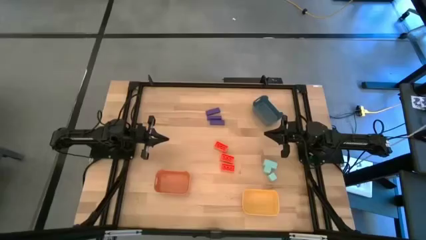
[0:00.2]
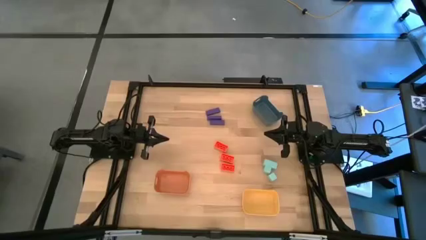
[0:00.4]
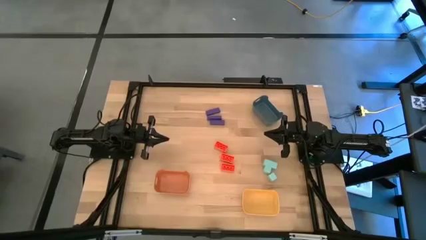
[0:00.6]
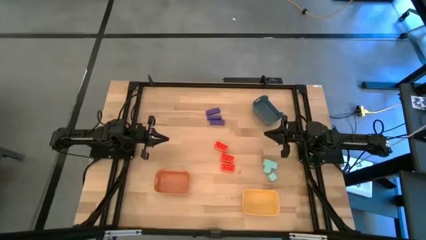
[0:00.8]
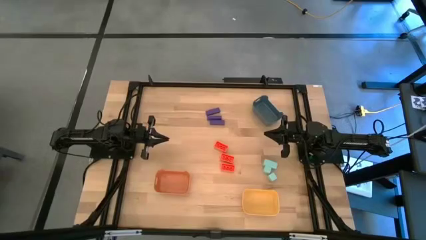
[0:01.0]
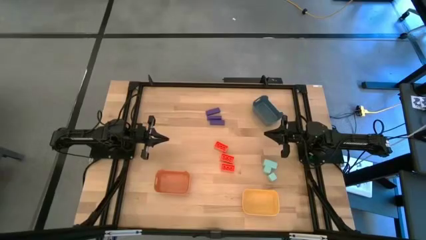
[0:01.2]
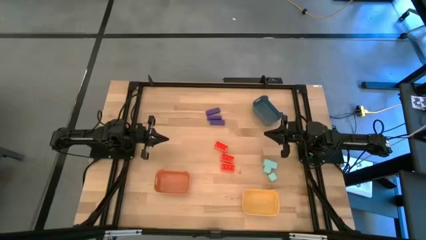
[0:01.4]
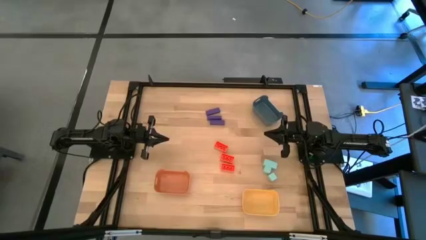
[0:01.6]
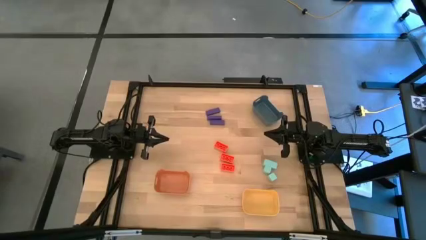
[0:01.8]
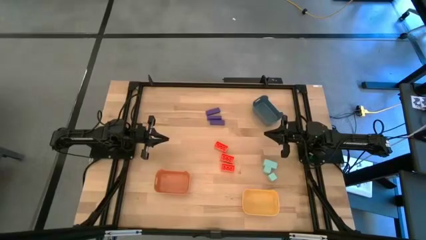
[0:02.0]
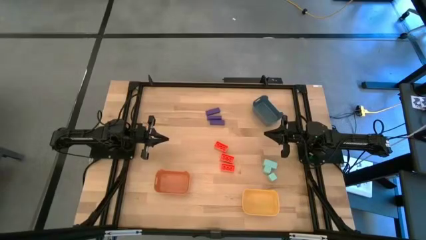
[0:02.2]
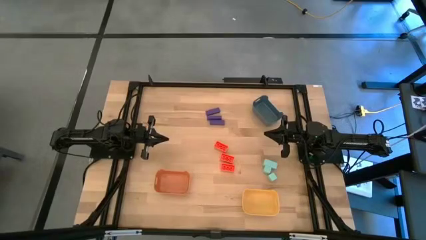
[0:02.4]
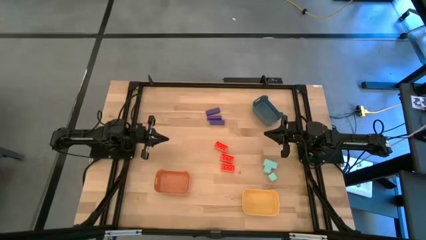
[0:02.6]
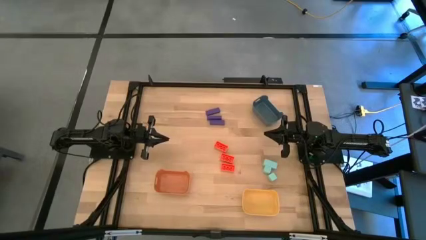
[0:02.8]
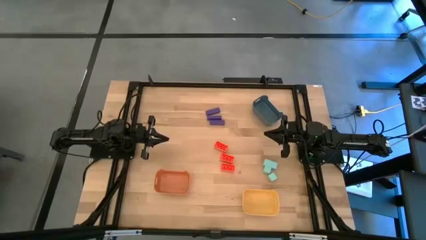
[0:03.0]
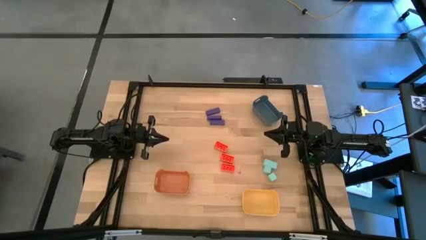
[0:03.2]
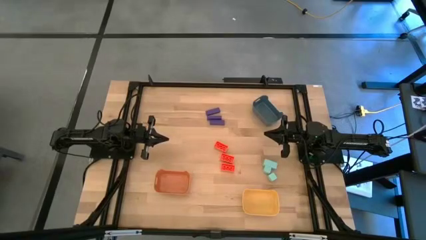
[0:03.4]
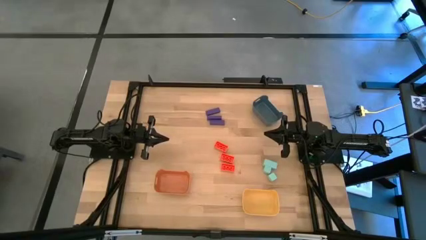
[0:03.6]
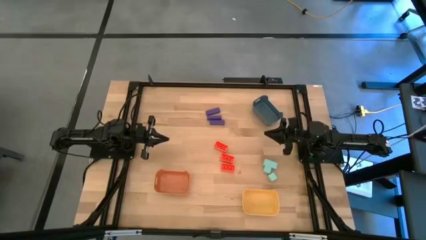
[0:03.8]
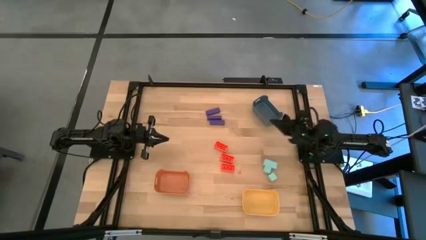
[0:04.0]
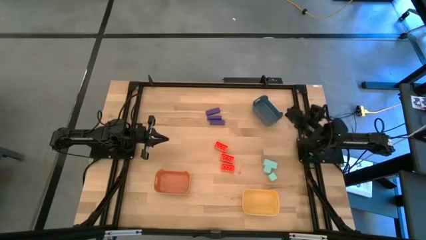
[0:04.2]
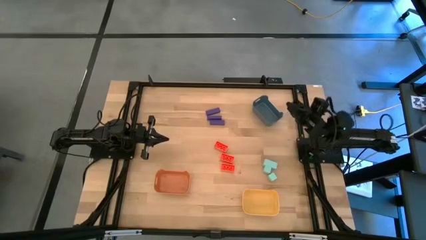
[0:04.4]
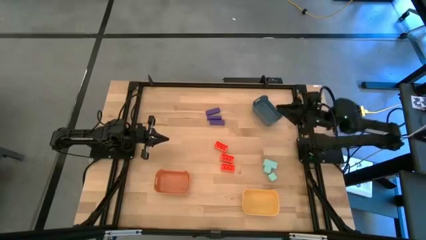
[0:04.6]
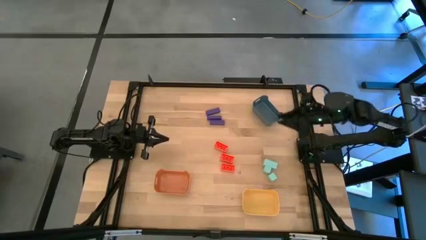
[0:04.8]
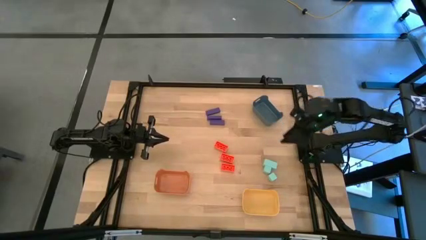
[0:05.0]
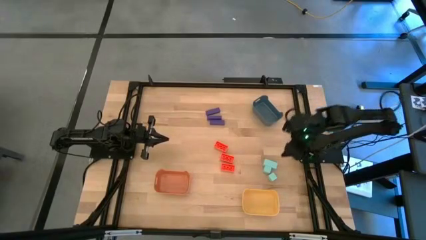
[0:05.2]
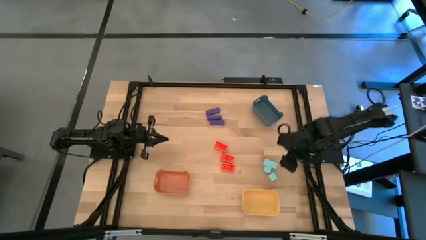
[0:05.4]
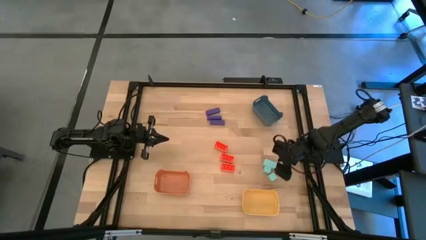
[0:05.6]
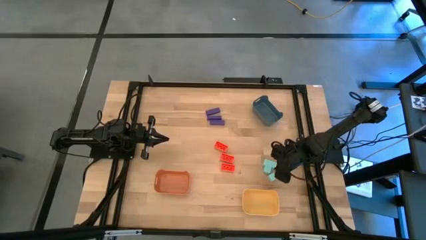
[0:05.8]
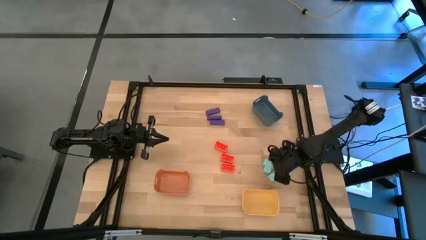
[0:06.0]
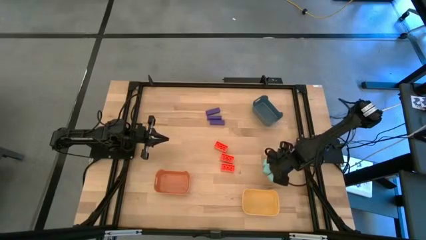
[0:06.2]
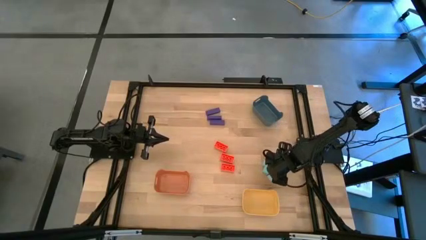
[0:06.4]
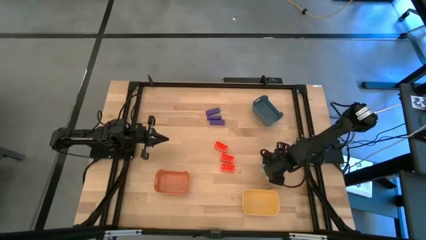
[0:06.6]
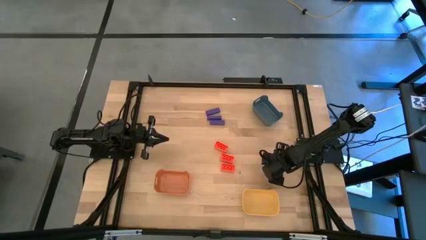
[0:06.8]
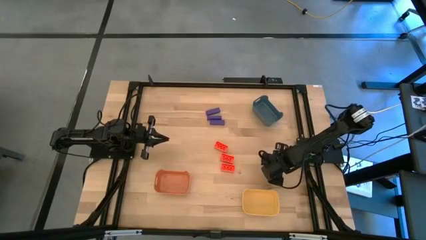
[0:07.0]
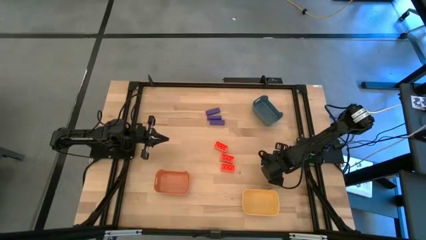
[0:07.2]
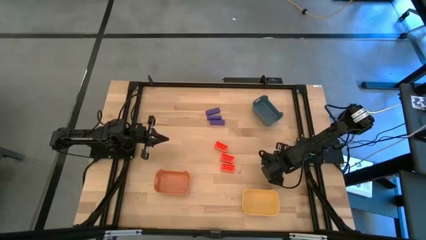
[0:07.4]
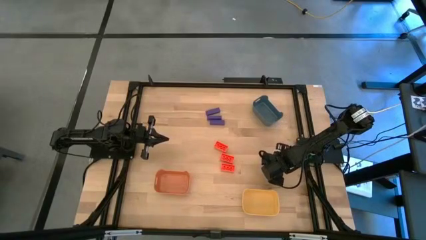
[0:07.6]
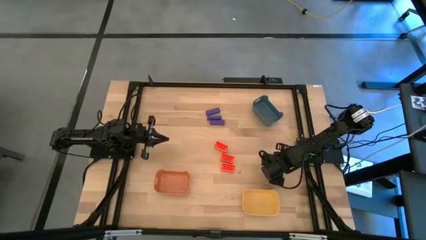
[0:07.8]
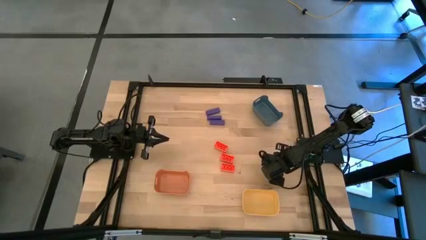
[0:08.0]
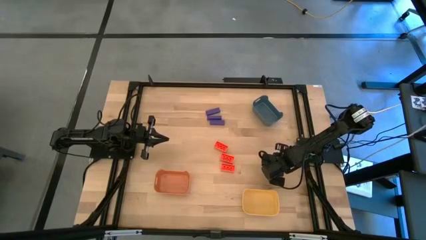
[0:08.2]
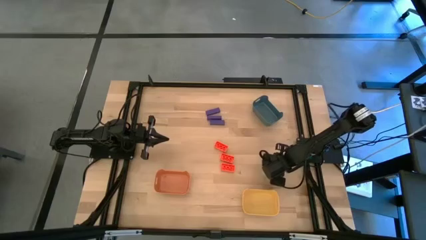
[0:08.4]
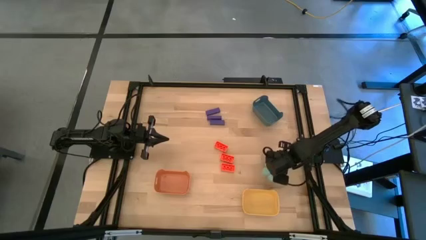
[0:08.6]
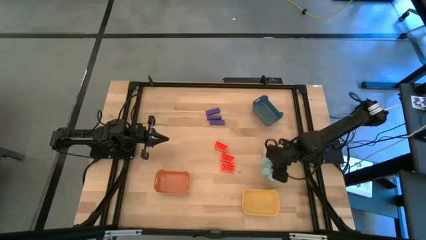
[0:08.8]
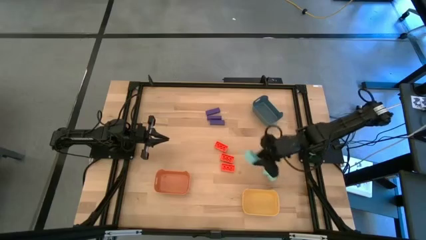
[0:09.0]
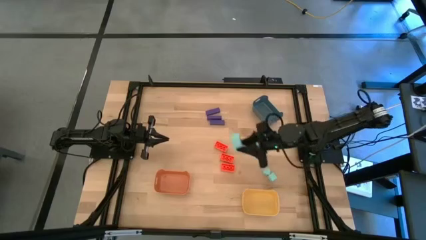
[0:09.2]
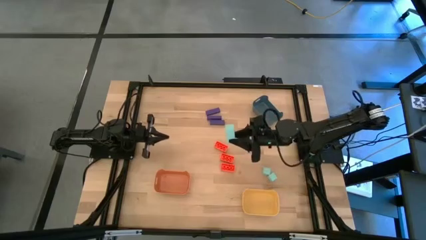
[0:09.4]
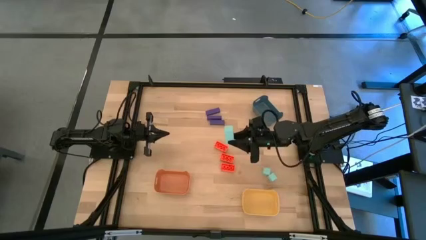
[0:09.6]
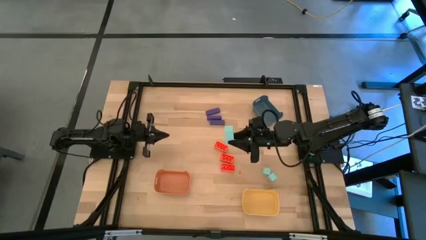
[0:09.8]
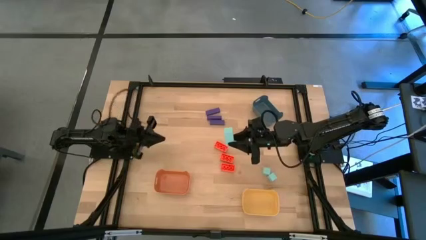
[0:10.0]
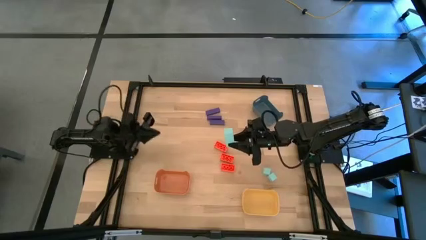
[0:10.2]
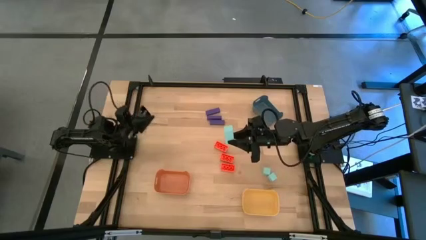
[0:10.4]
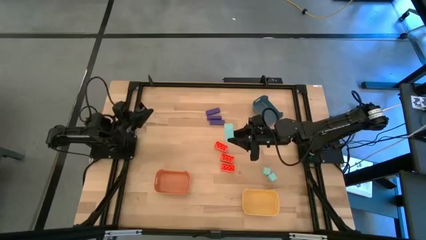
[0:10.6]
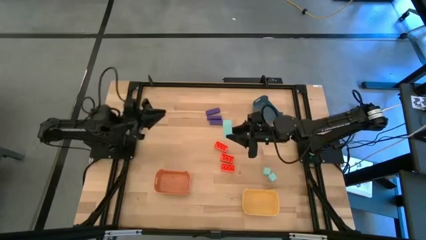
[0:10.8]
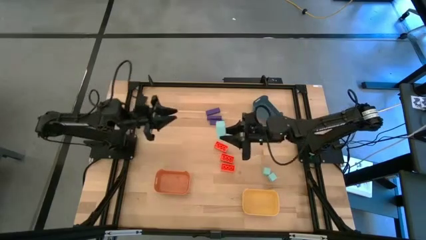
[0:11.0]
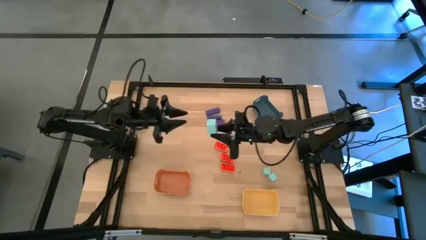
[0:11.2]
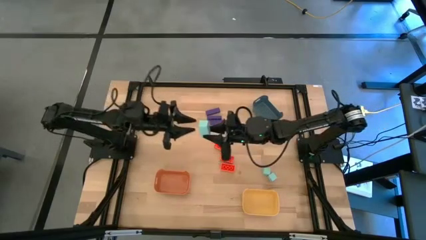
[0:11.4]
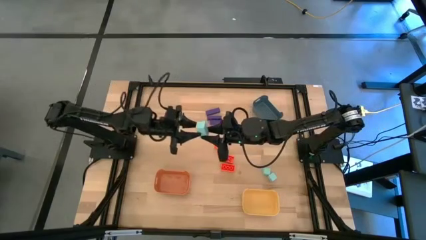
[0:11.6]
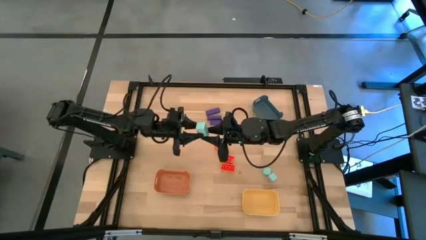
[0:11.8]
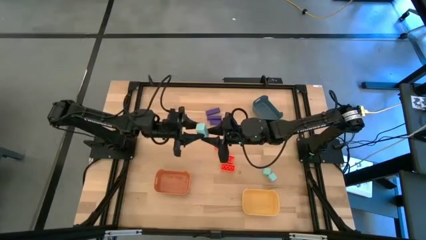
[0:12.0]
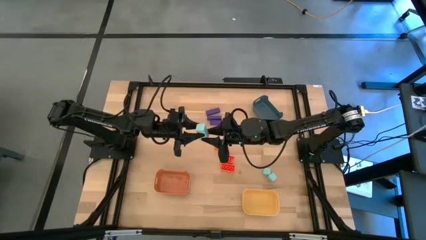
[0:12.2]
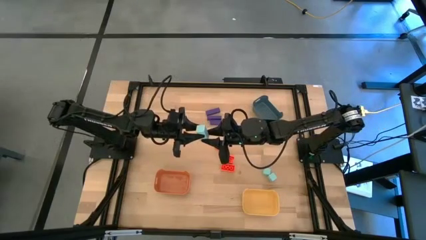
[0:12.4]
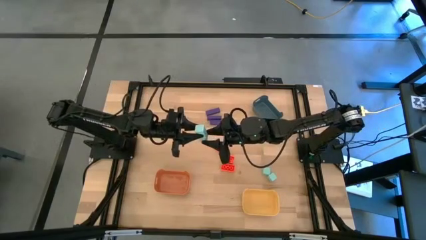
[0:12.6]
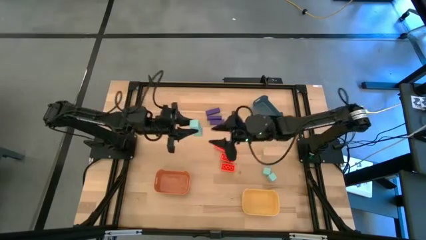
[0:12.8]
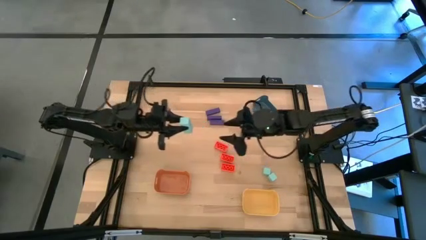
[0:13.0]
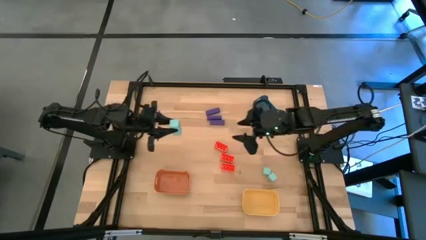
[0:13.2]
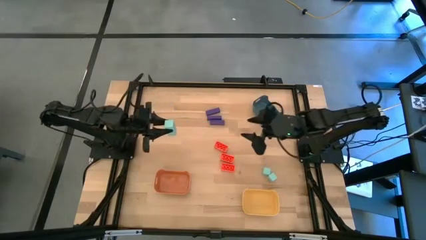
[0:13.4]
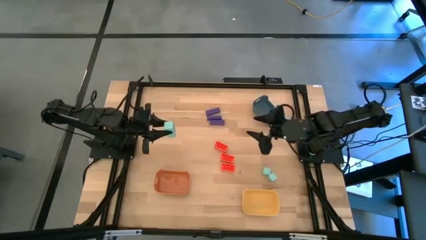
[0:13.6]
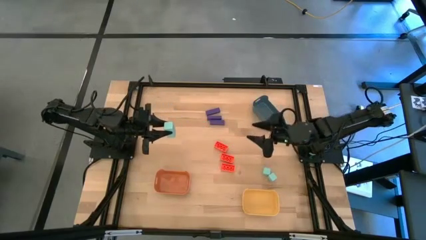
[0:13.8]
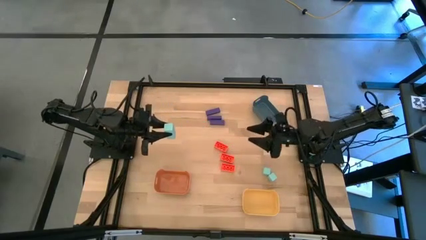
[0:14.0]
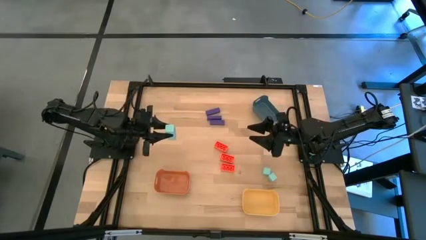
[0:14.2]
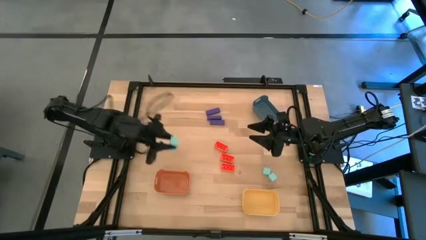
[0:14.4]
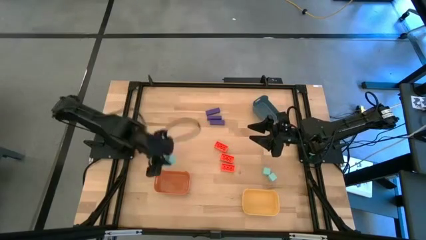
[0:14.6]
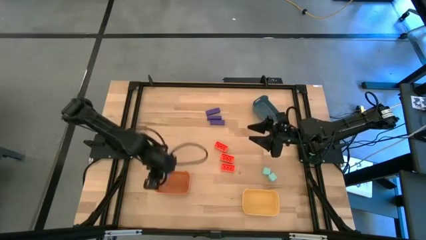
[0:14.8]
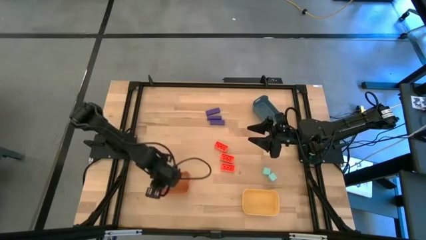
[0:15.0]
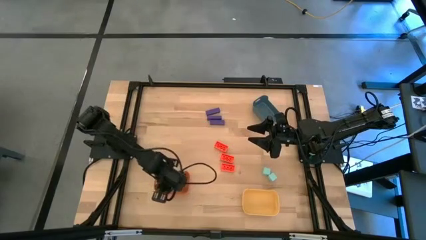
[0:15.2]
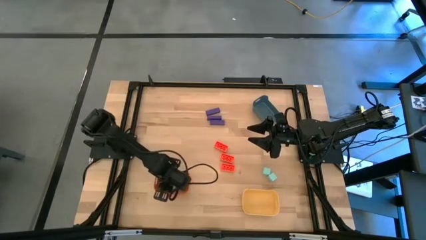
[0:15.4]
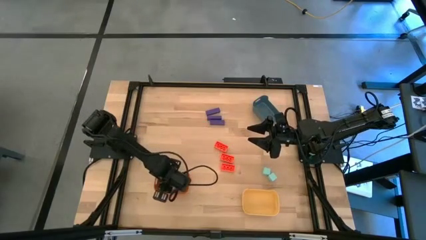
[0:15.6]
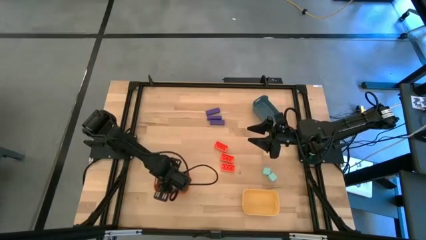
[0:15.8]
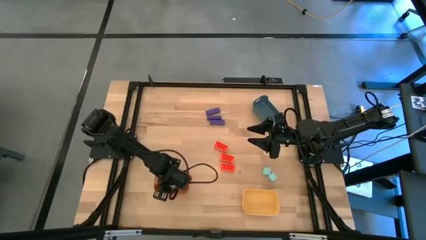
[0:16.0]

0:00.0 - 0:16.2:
Task: Sort & place blocks by color
Put the top light blue block into the brown bin
